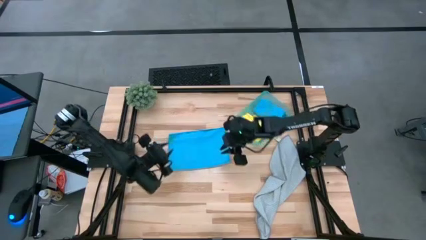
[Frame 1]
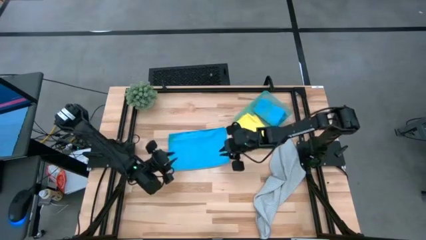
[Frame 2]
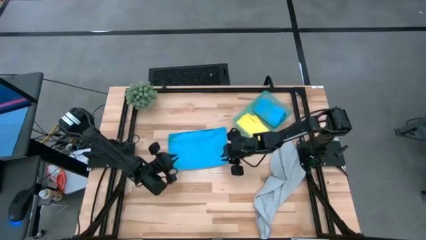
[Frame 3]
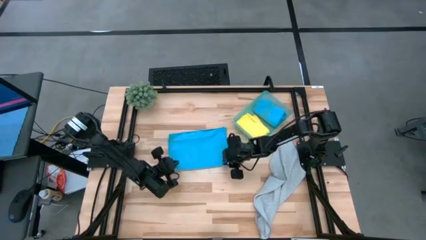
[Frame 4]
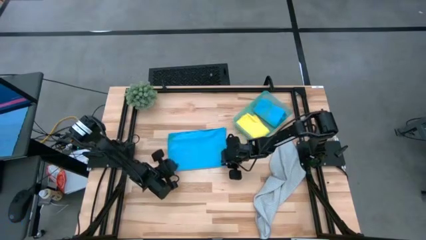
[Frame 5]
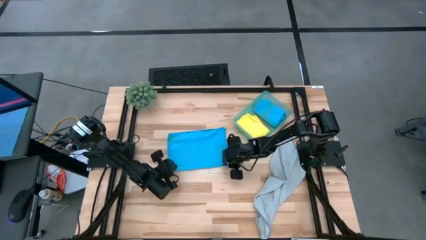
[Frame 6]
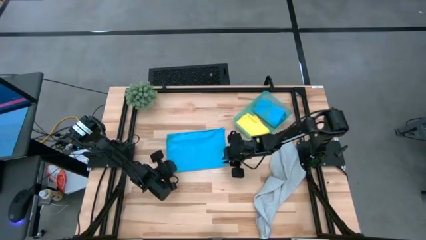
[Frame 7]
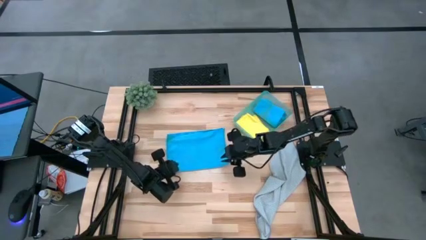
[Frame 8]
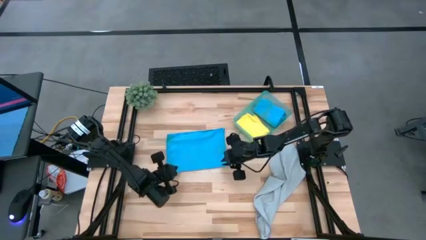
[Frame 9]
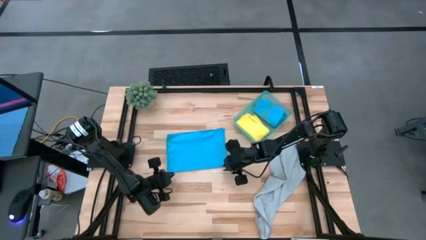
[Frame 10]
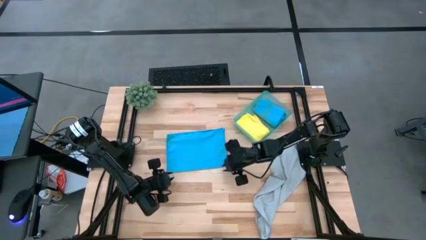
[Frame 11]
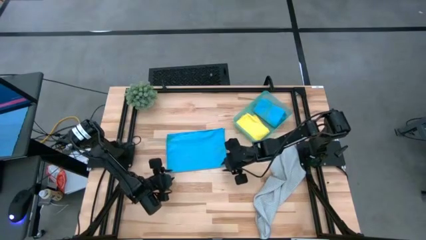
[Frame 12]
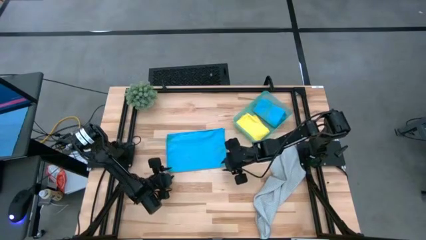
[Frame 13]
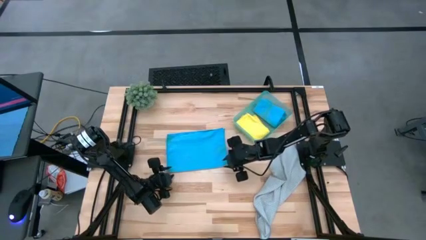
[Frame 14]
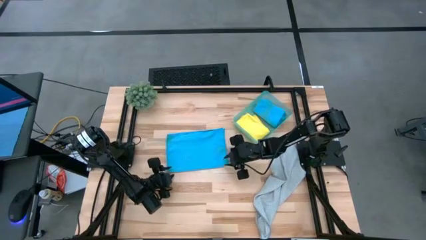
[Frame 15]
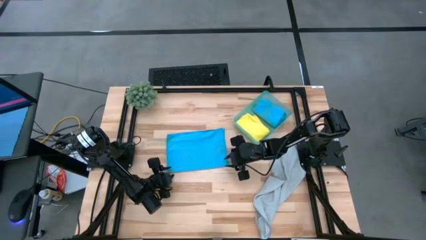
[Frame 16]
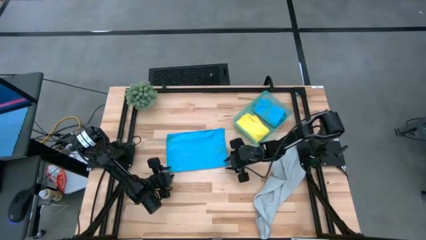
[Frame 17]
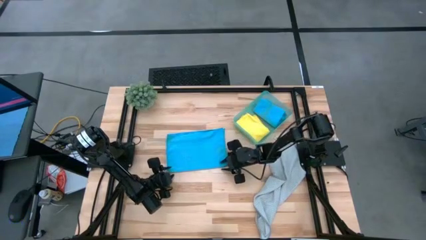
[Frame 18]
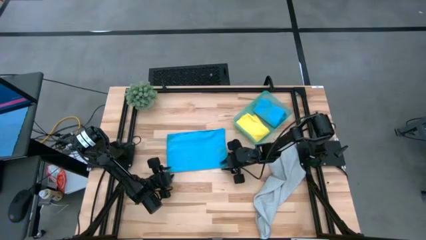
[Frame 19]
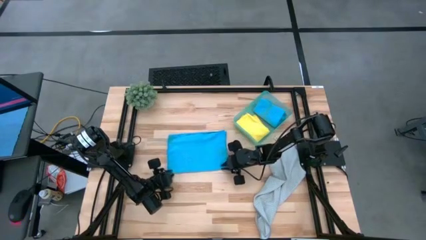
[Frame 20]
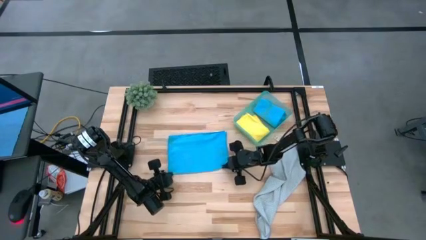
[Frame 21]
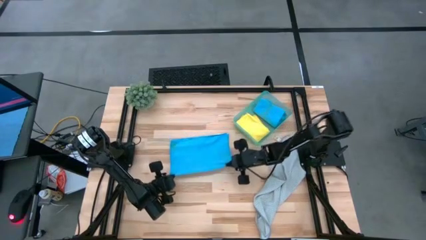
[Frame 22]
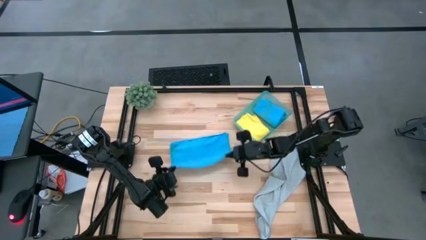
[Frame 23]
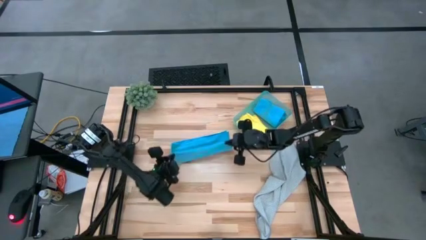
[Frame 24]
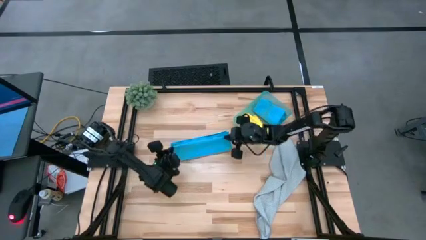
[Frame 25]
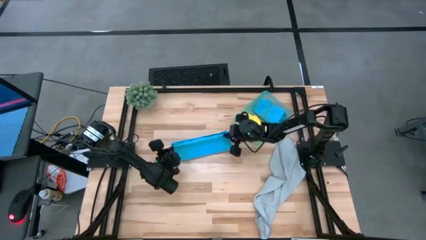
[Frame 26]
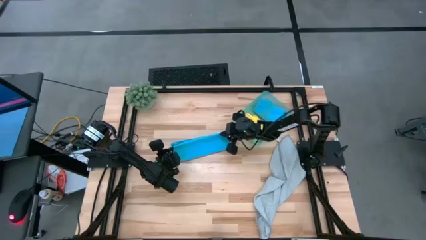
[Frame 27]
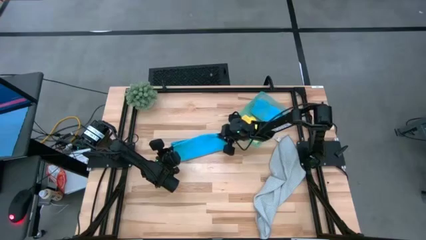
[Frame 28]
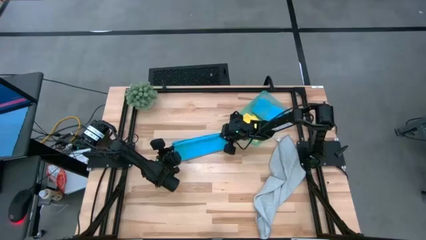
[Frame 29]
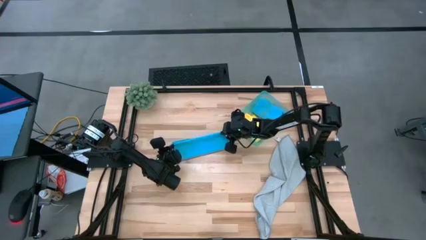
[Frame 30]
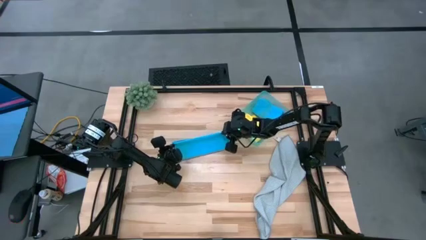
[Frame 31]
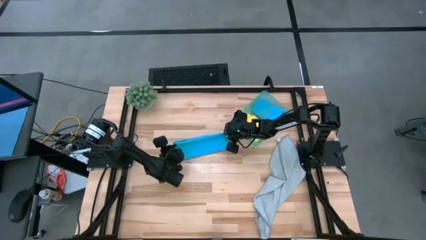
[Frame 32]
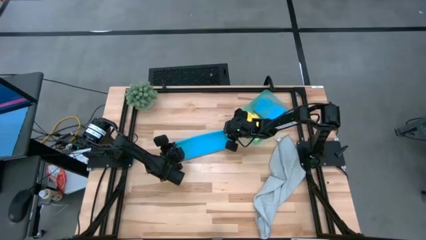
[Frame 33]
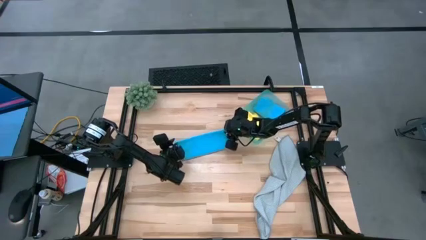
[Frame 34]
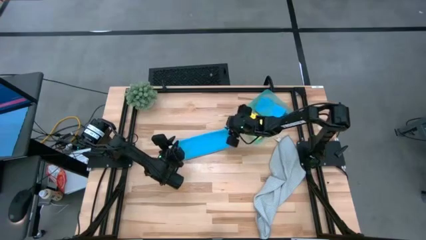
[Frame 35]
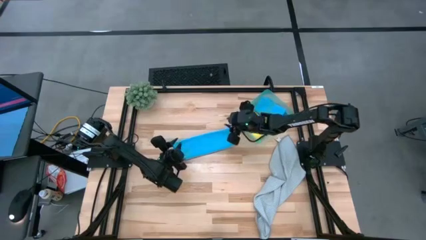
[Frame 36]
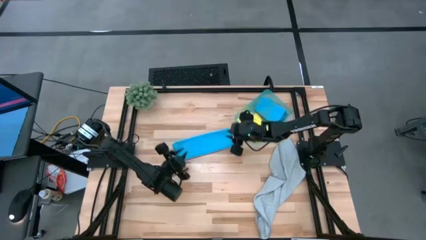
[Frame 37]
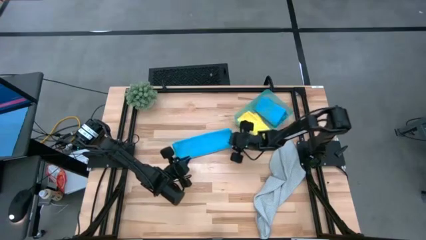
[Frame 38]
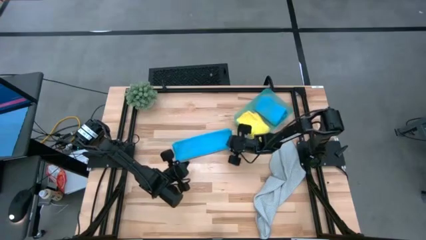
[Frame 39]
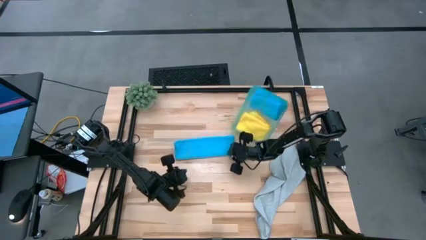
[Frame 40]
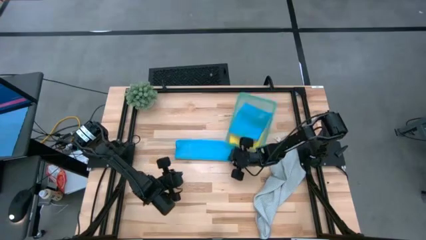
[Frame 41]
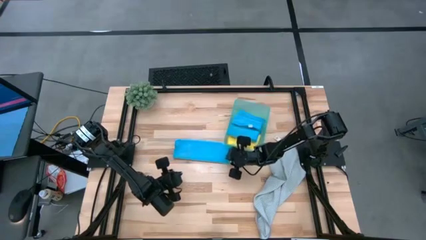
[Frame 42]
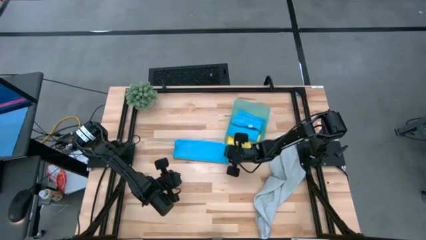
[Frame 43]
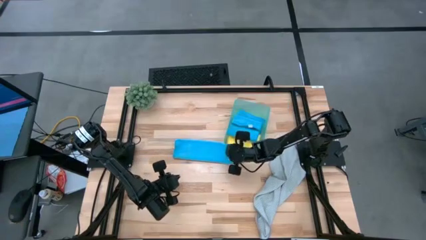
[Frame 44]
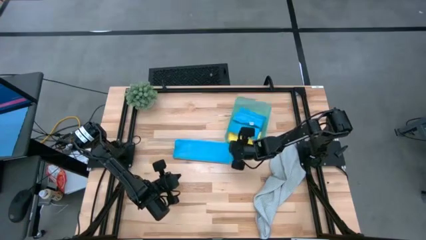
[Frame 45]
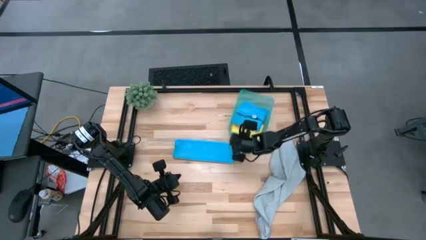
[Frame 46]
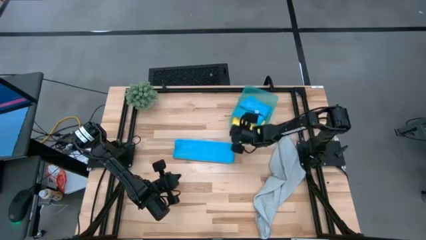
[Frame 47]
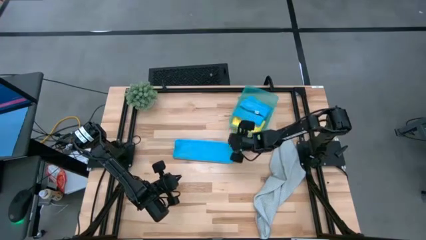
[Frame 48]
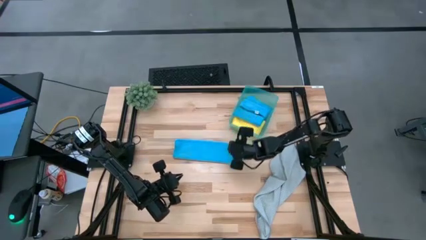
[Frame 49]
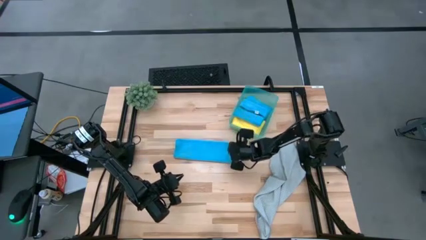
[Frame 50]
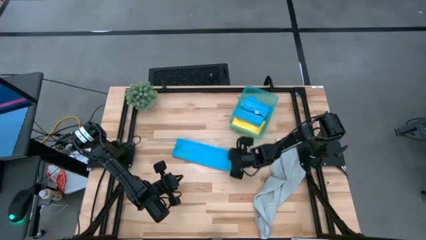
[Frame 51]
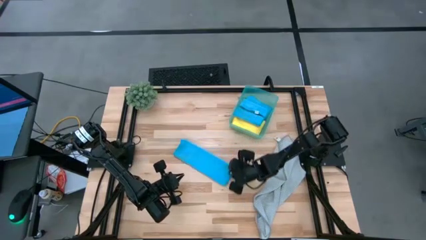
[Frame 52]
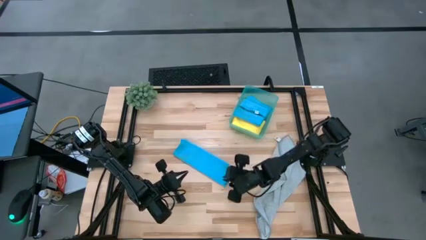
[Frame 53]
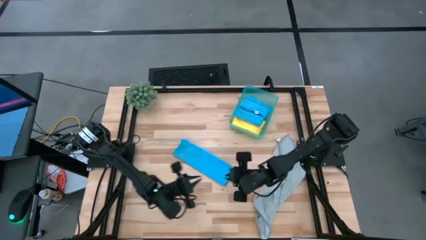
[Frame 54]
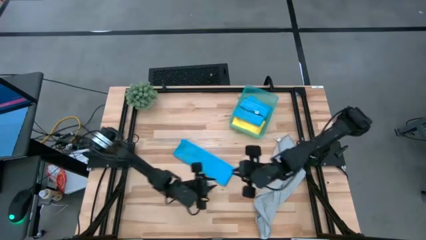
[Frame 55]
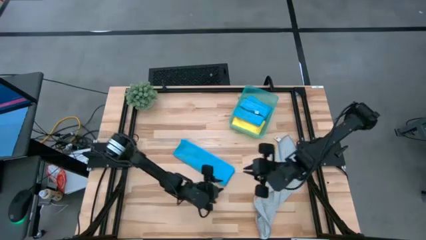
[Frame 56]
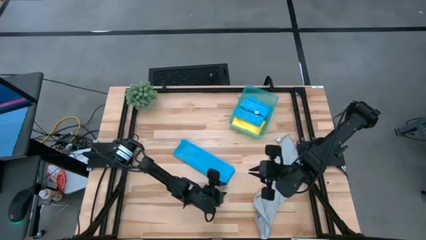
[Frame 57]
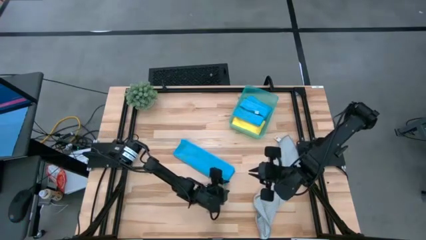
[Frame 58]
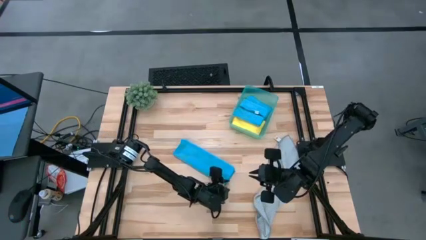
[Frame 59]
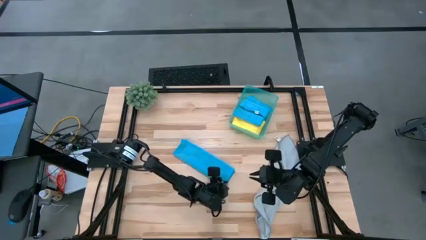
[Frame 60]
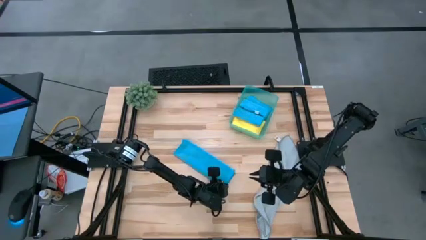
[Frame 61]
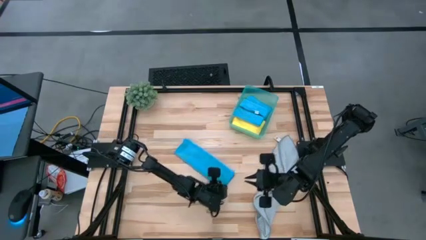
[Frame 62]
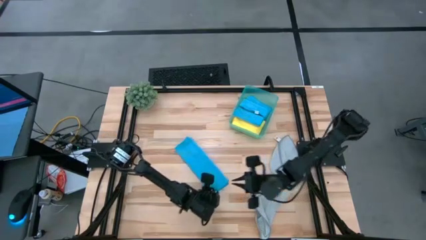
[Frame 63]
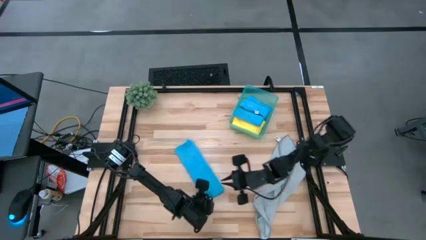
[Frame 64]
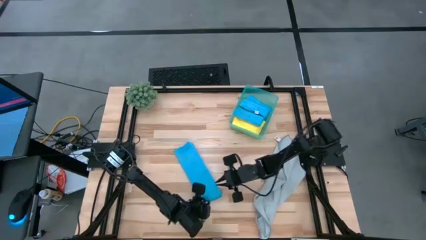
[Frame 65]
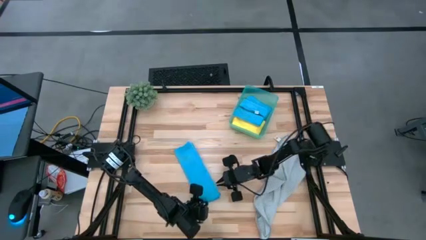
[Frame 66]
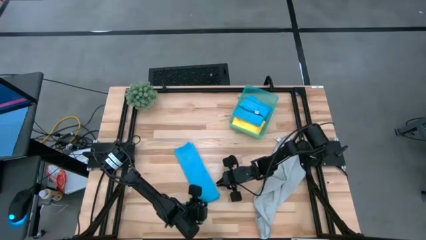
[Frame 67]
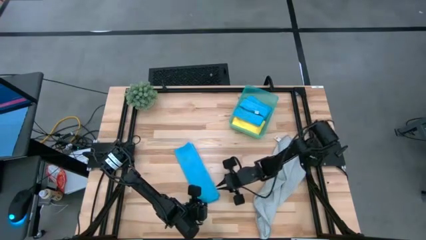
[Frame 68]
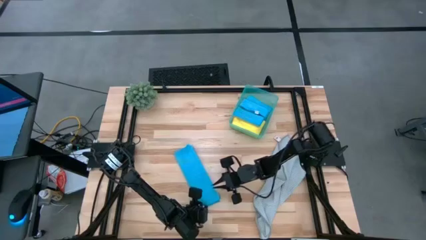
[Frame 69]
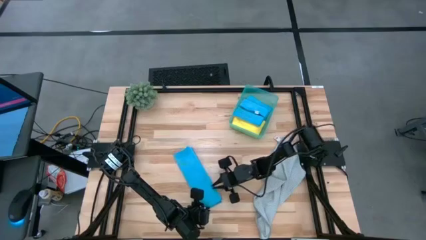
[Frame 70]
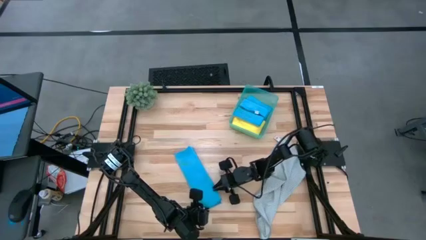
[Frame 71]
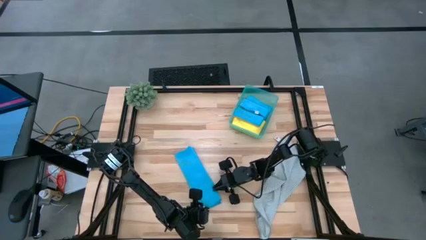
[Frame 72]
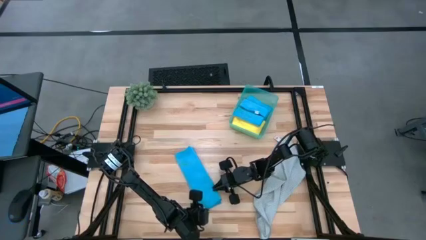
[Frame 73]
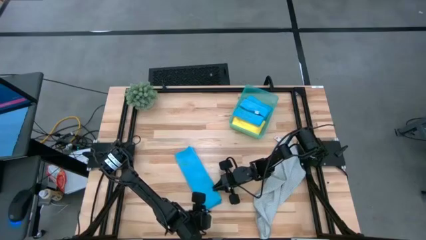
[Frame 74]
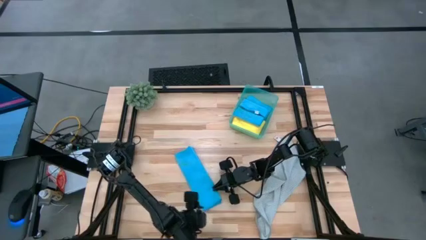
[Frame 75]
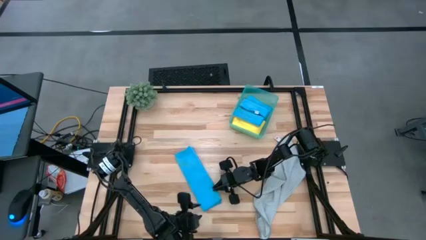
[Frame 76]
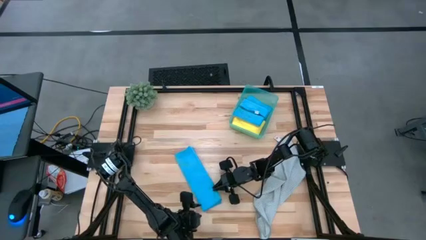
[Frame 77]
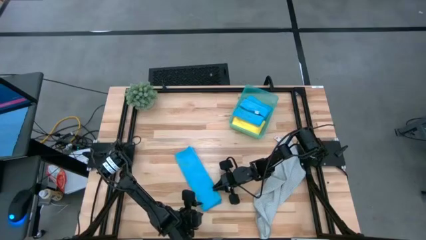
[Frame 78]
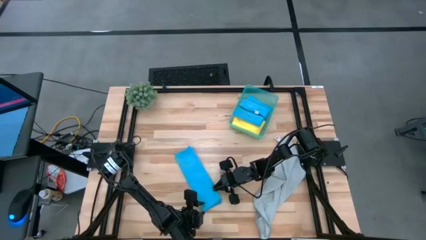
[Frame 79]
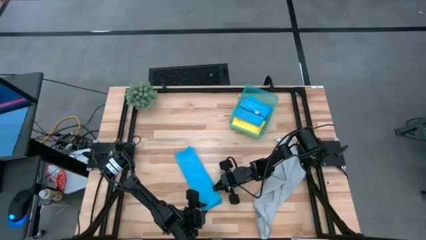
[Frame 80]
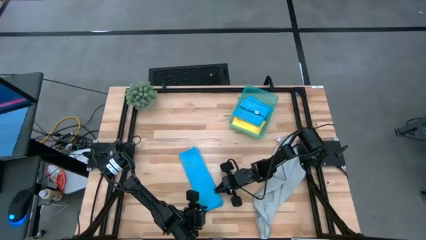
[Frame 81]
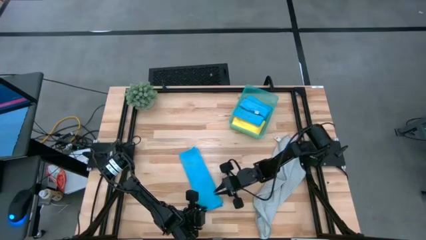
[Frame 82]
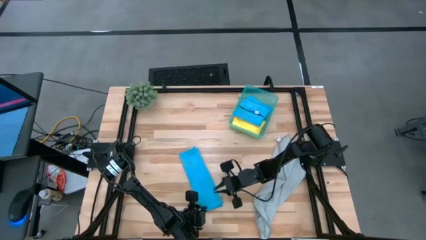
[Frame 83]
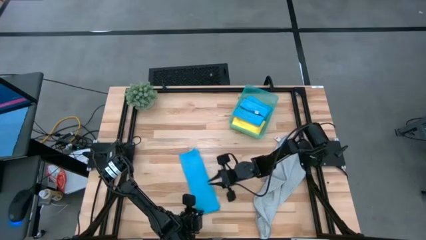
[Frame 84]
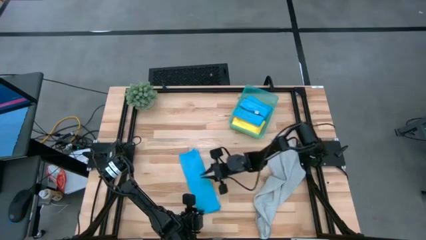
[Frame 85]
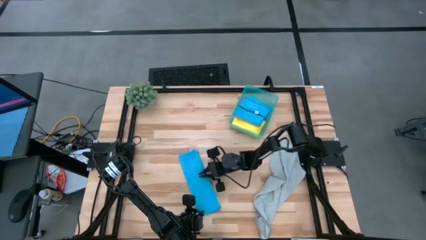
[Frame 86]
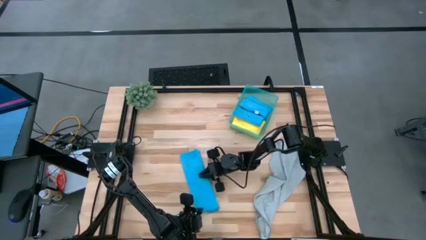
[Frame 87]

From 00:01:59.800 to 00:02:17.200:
Task: Fold microfiber towels
Fold the blue towel
